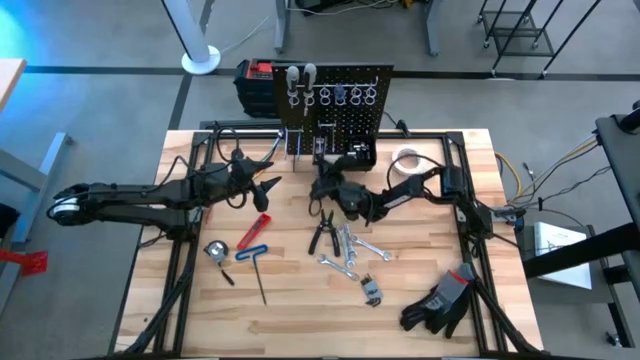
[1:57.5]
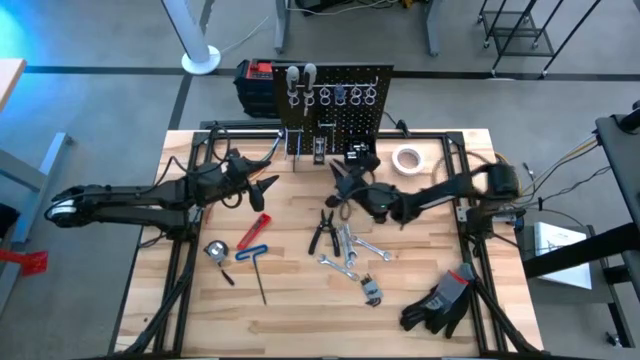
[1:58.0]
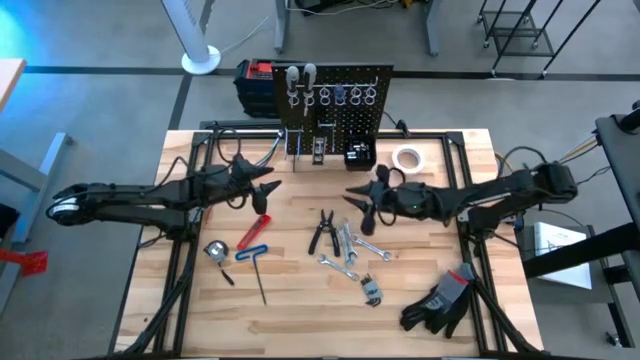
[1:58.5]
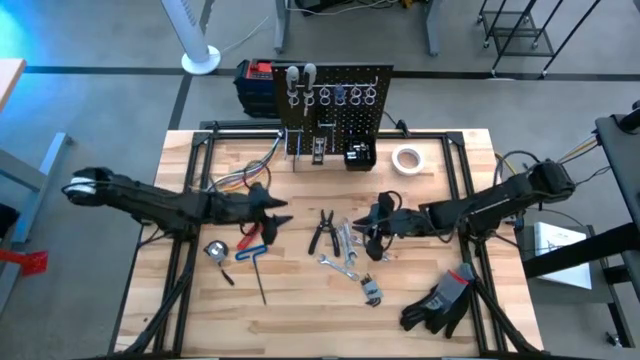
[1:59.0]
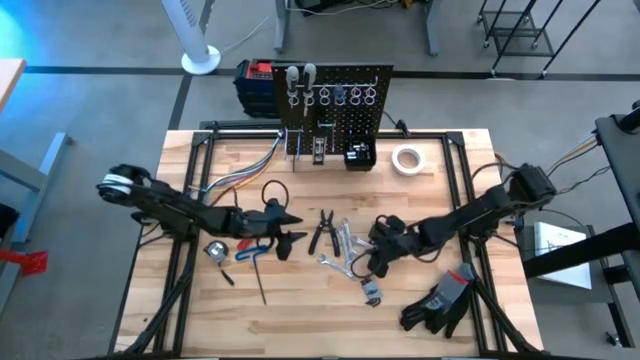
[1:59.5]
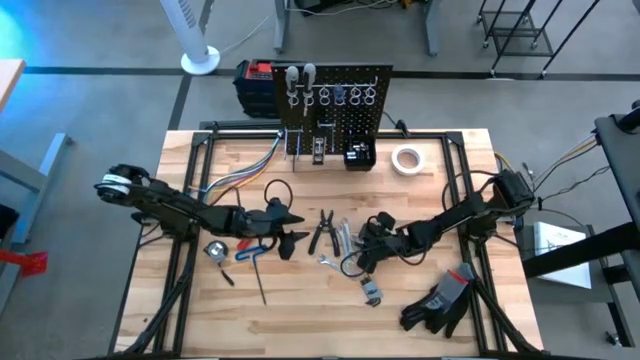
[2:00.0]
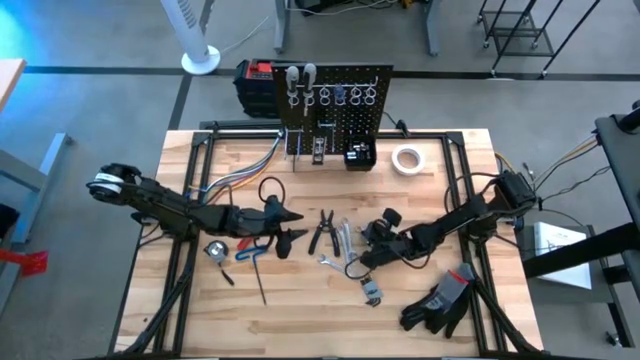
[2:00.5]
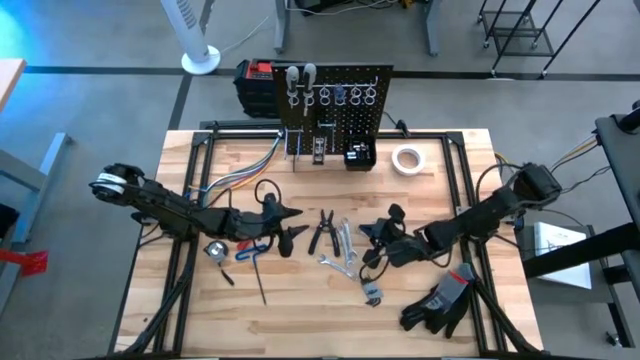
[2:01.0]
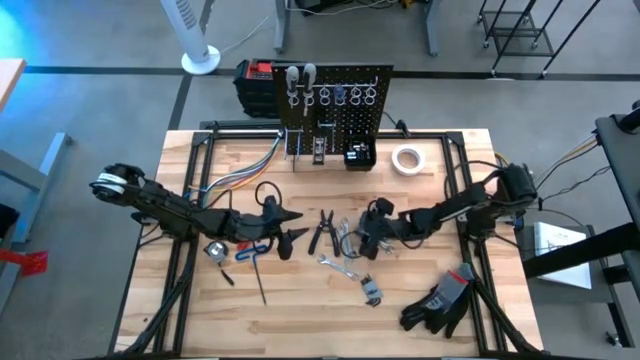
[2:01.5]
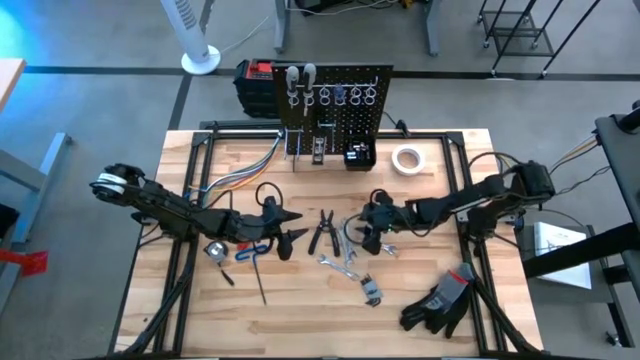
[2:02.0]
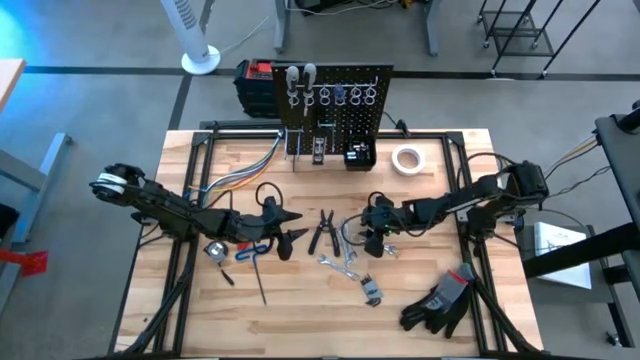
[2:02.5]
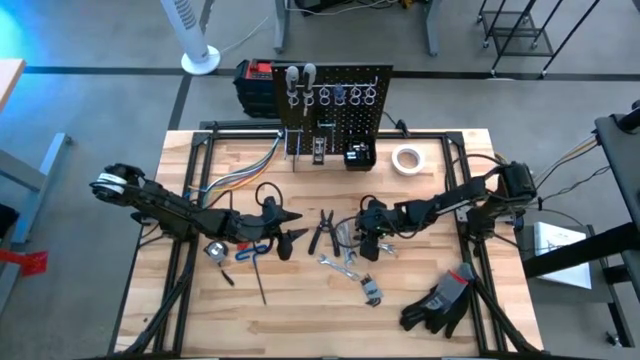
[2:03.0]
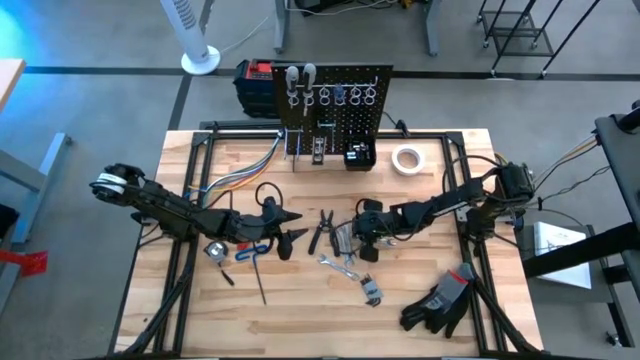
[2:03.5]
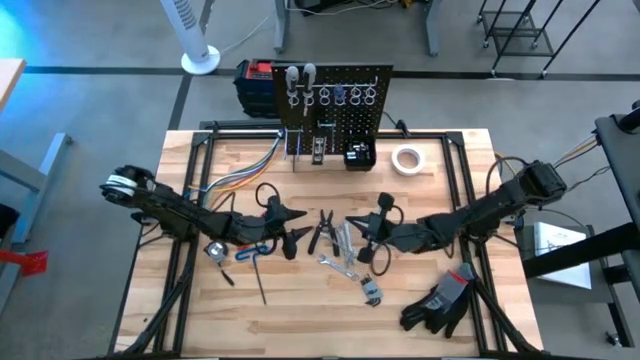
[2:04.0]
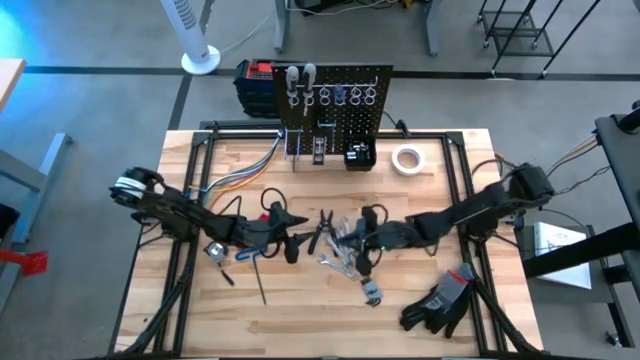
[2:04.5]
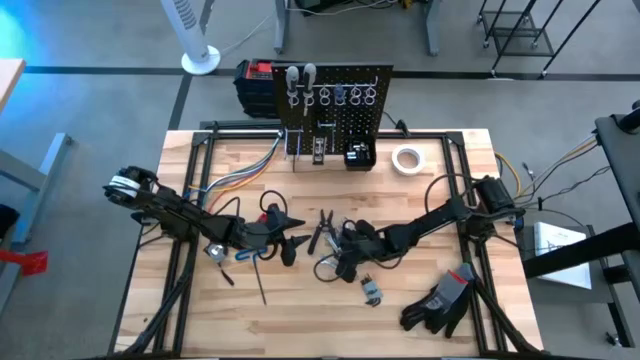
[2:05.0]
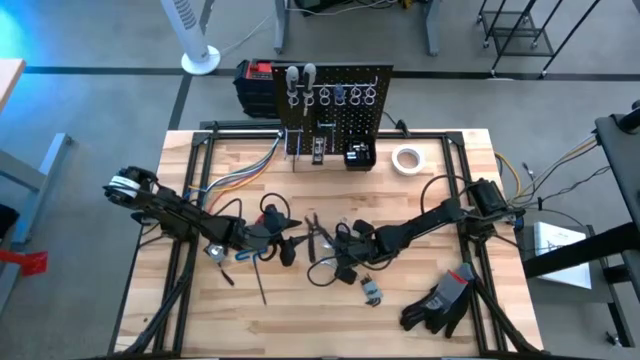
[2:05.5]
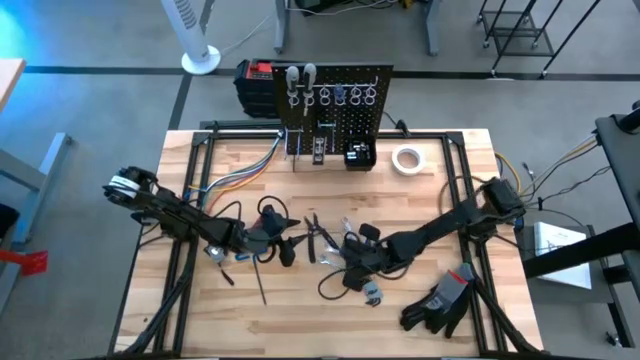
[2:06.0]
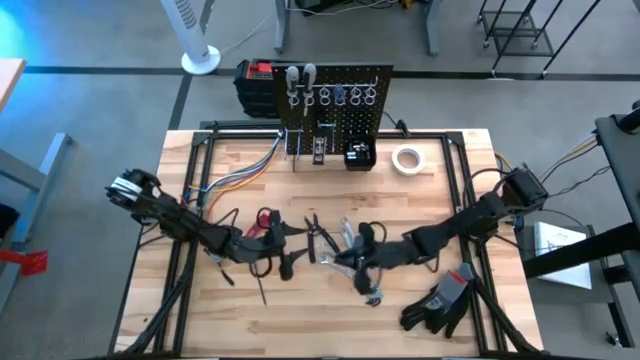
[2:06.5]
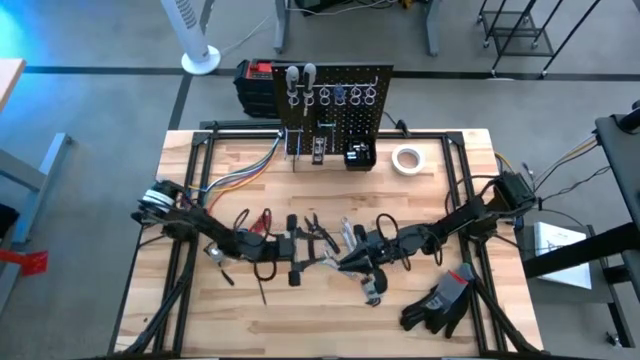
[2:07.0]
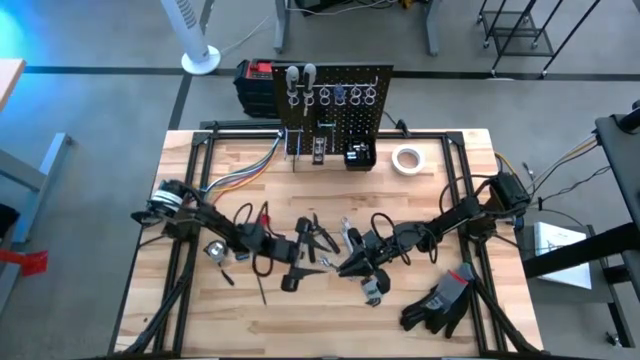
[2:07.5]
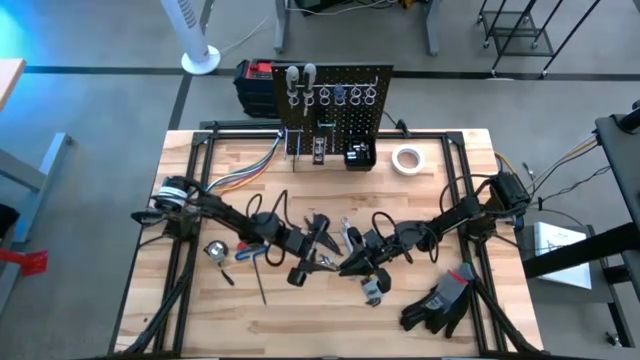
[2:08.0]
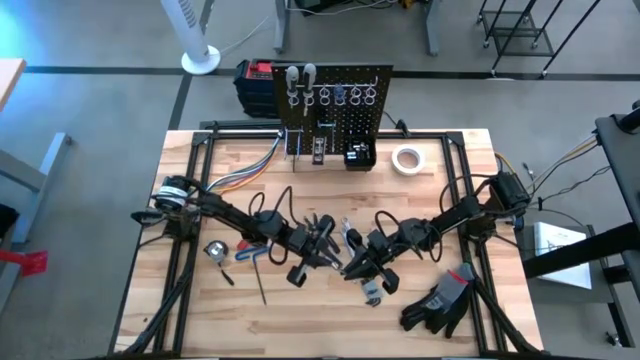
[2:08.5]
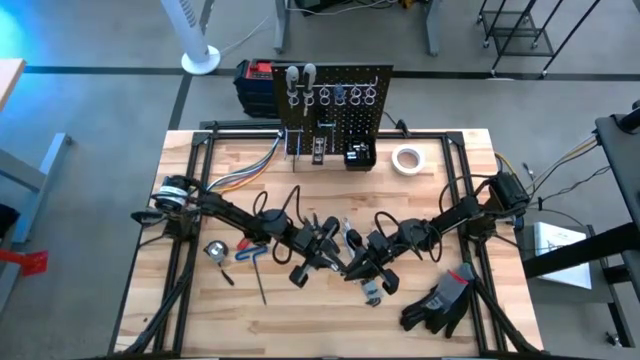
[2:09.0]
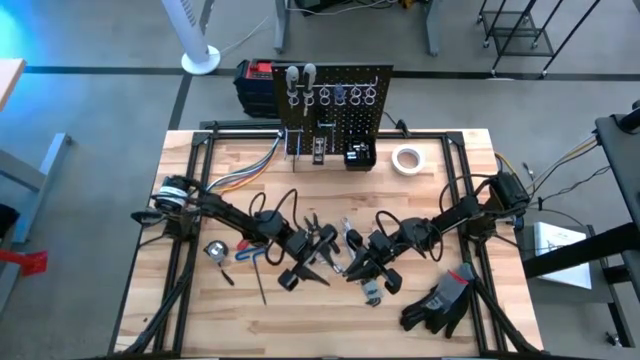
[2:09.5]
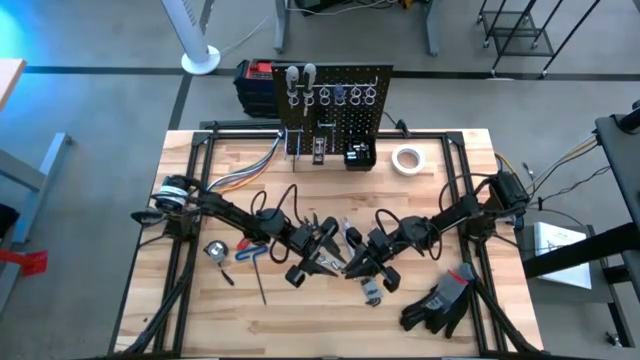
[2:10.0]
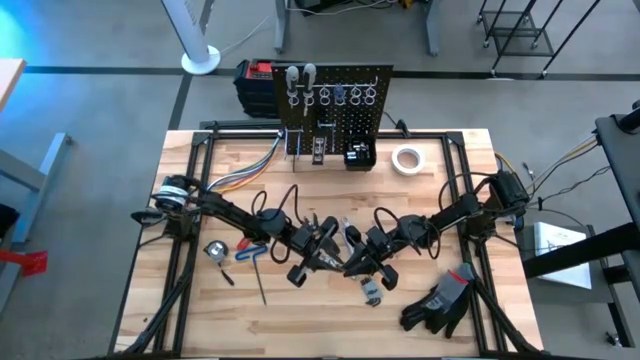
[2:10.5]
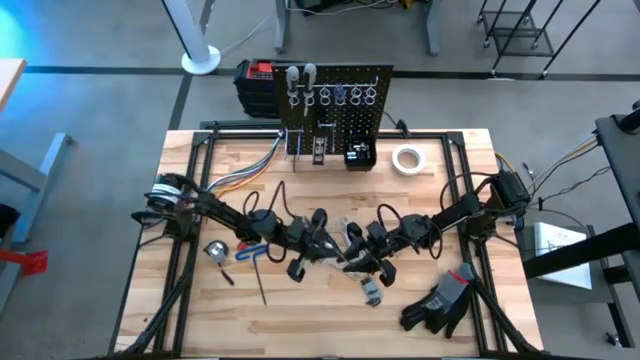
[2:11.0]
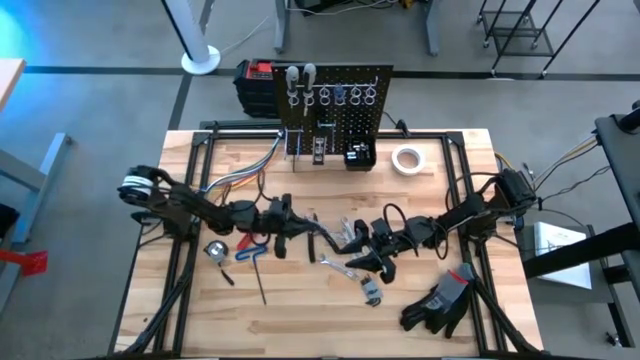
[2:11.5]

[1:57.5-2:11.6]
Task: Hang tools onto peg board
Hang the wrench on the peg board

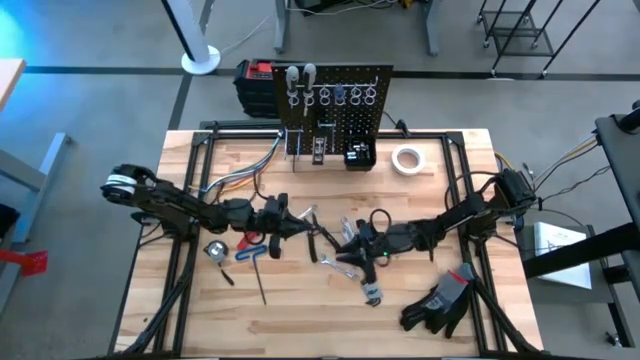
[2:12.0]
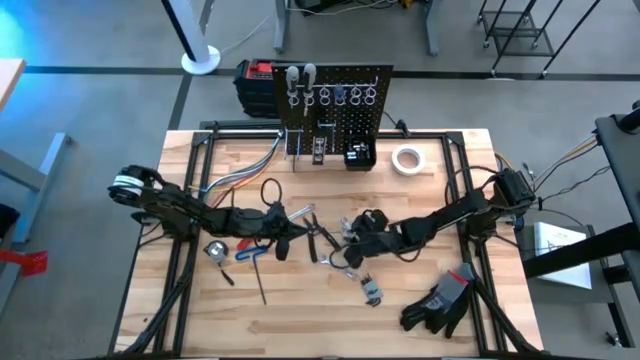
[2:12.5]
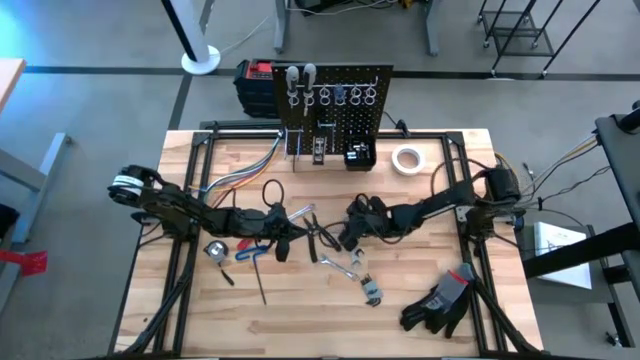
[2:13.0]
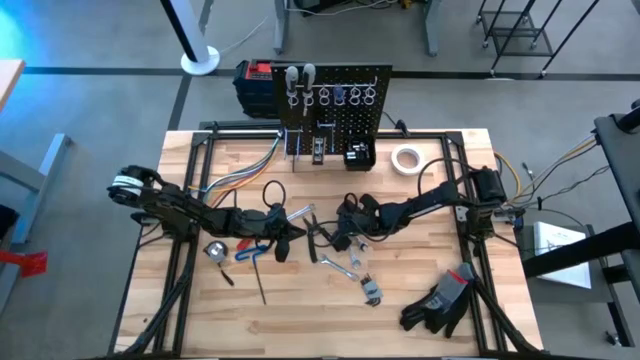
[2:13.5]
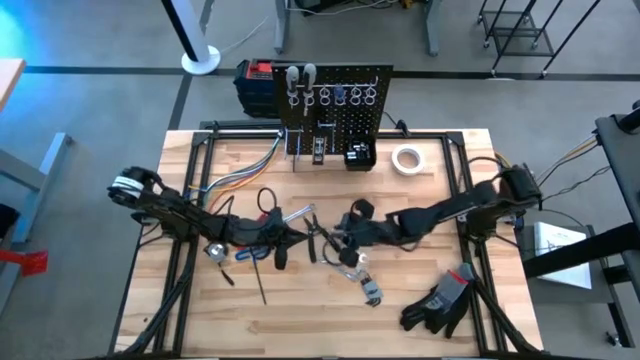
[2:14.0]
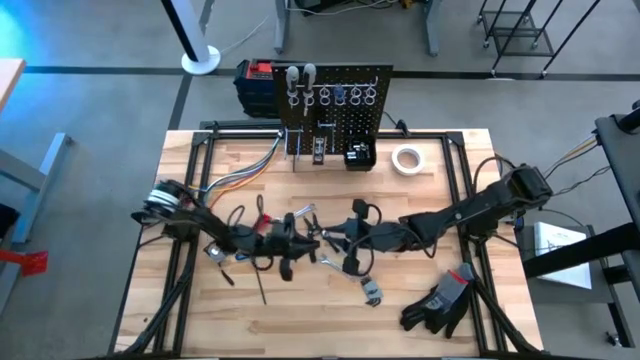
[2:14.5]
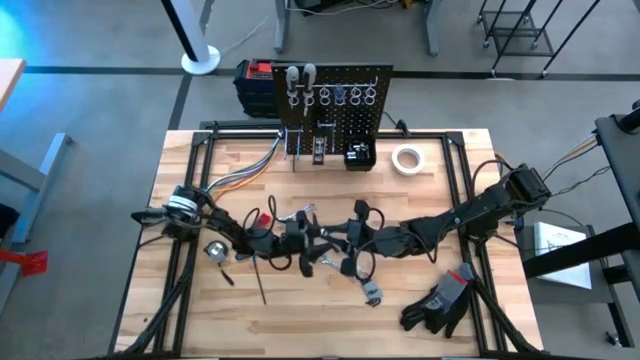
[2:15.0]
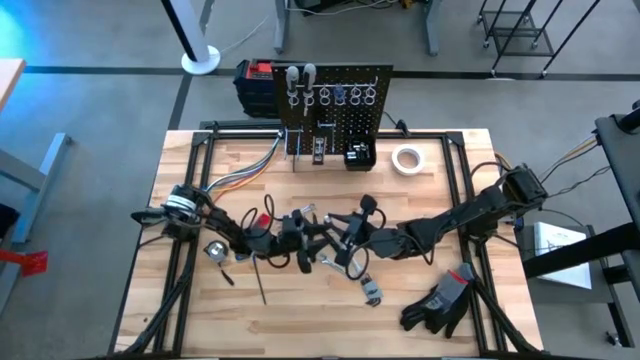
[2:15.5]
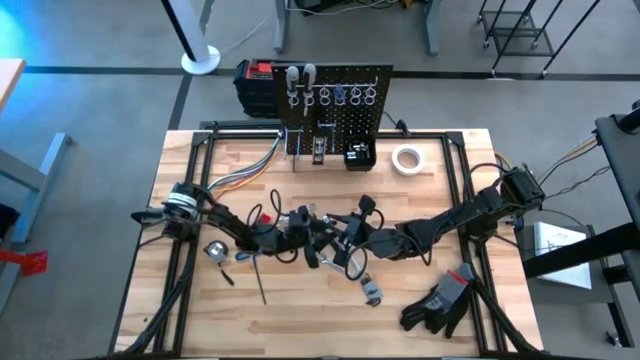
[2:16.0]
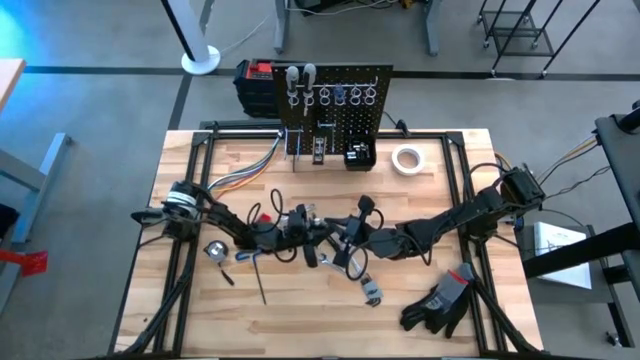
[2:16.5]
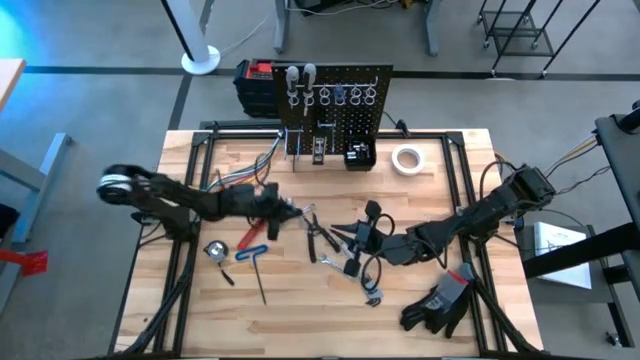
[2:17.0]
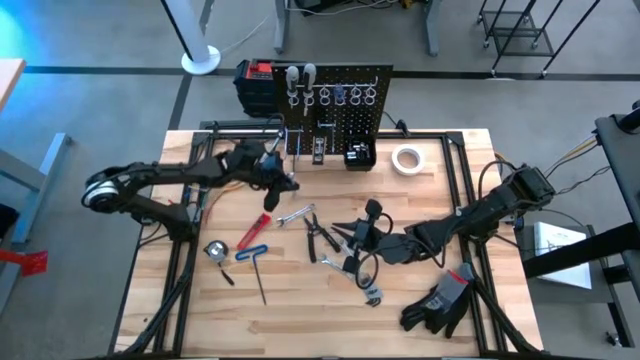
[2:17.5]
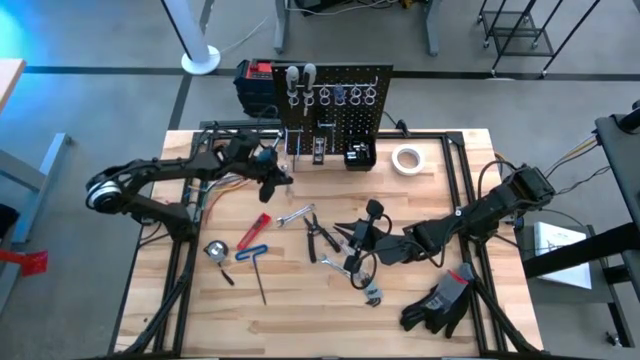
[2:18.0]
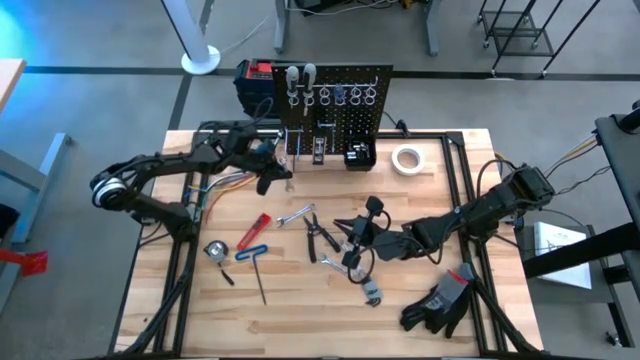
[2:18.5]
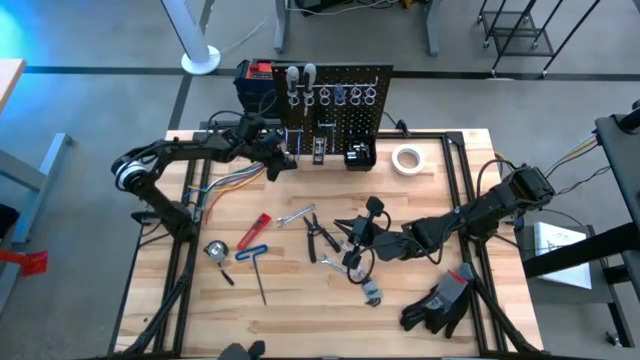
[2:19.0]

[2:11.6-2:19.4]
Hang the wrench on the peg board
